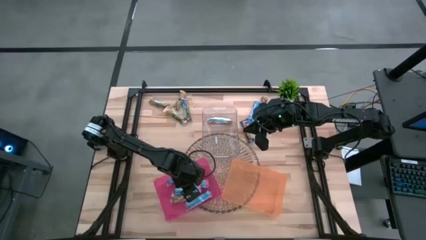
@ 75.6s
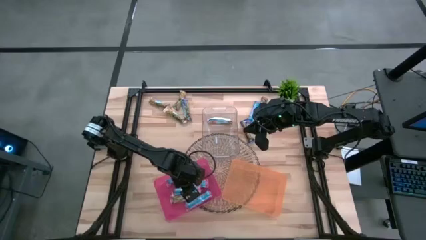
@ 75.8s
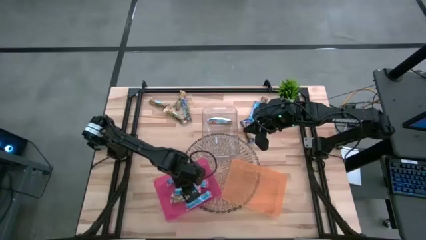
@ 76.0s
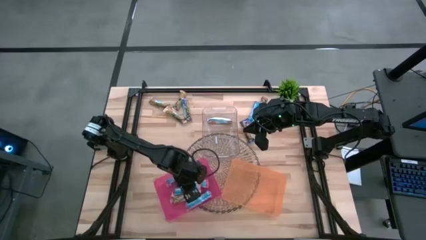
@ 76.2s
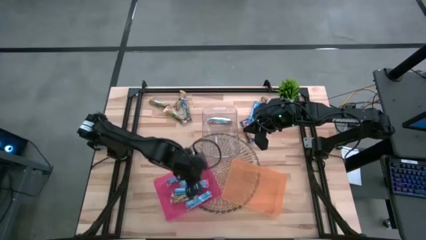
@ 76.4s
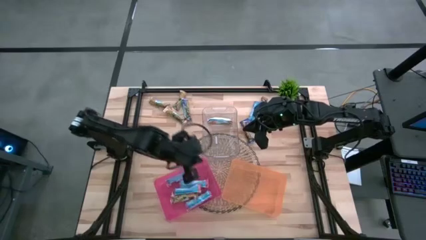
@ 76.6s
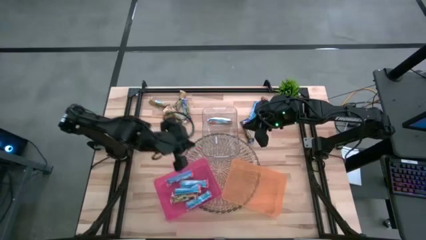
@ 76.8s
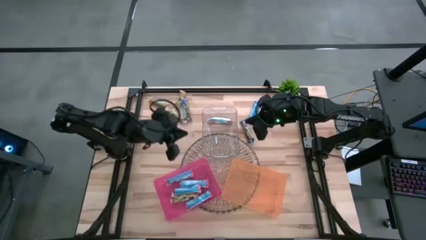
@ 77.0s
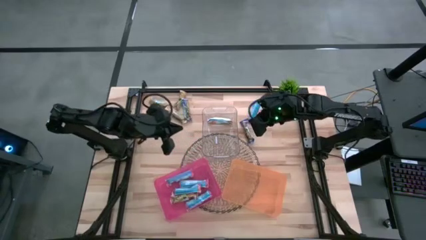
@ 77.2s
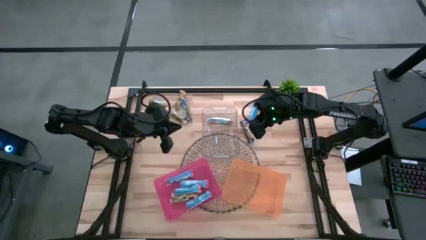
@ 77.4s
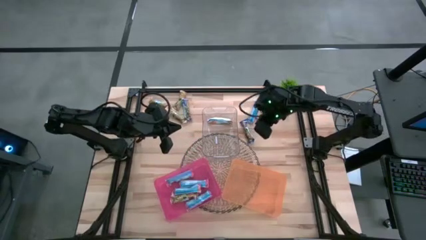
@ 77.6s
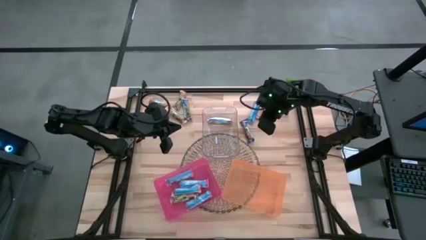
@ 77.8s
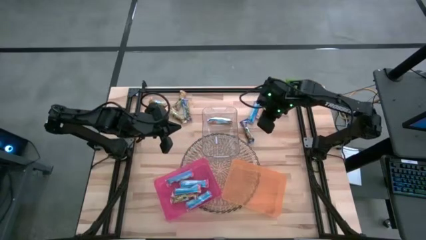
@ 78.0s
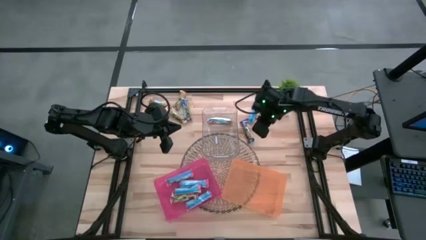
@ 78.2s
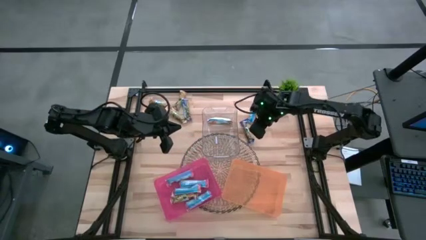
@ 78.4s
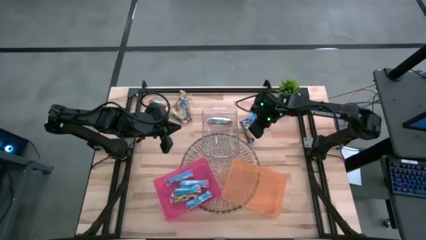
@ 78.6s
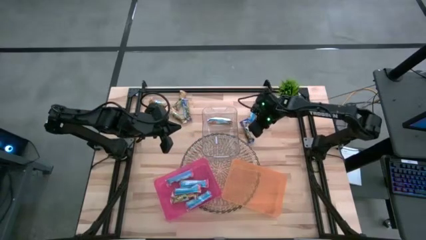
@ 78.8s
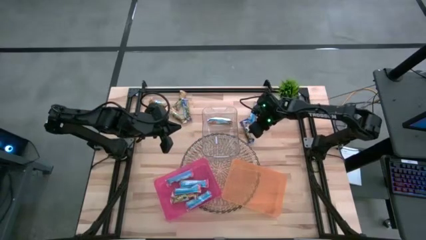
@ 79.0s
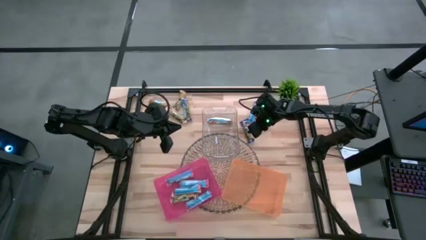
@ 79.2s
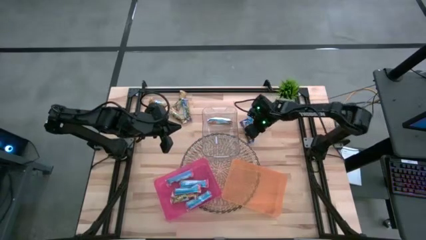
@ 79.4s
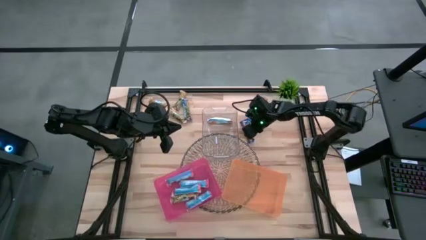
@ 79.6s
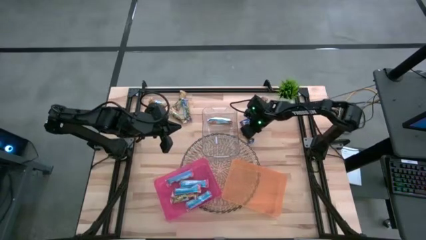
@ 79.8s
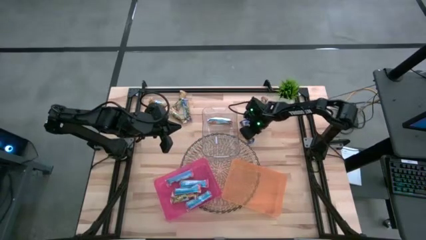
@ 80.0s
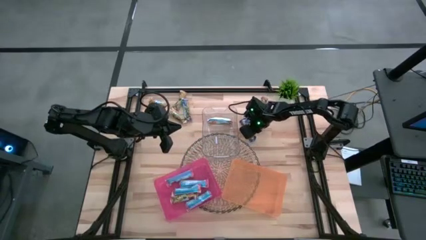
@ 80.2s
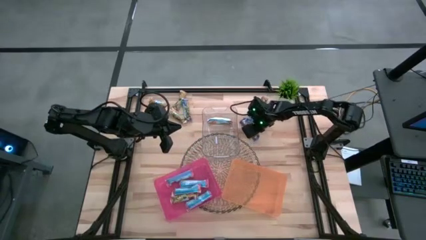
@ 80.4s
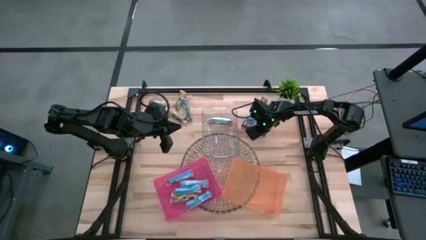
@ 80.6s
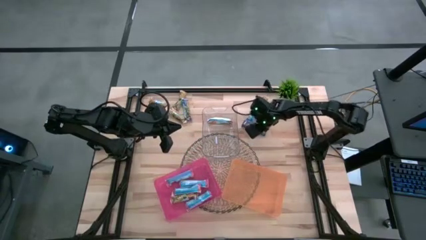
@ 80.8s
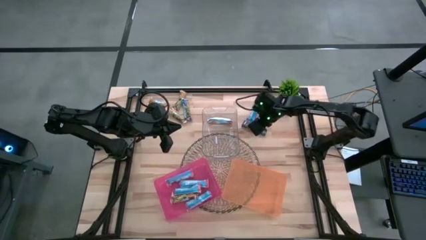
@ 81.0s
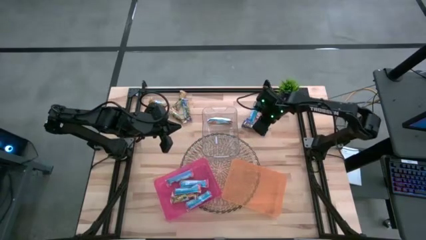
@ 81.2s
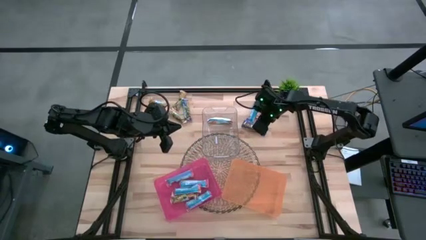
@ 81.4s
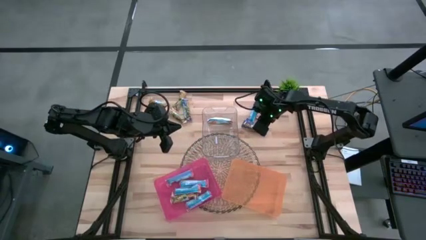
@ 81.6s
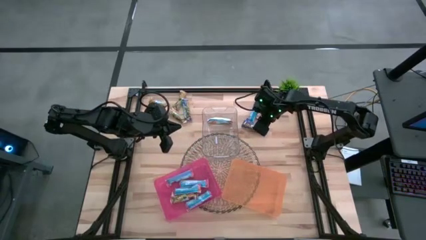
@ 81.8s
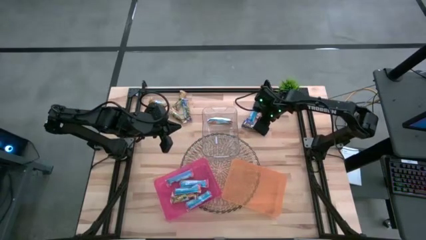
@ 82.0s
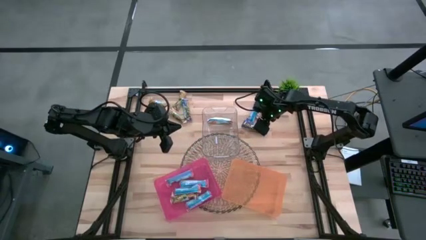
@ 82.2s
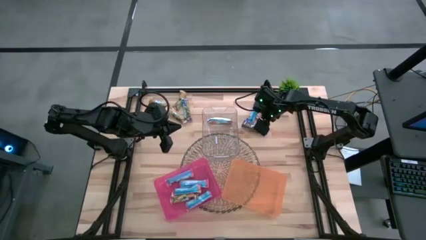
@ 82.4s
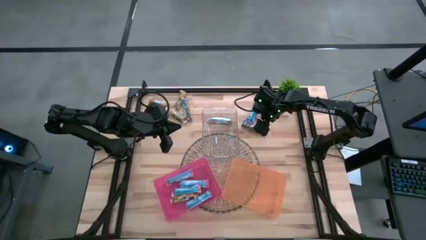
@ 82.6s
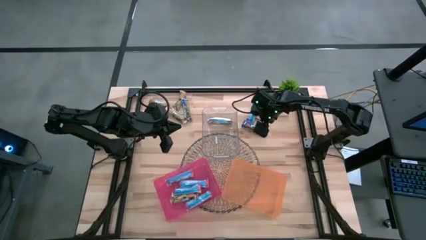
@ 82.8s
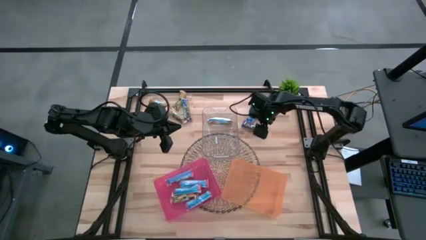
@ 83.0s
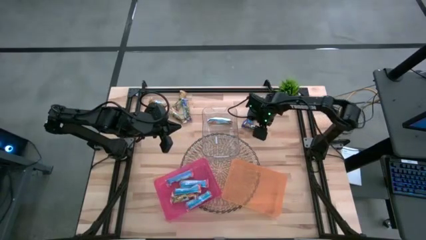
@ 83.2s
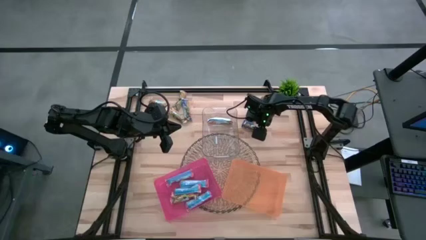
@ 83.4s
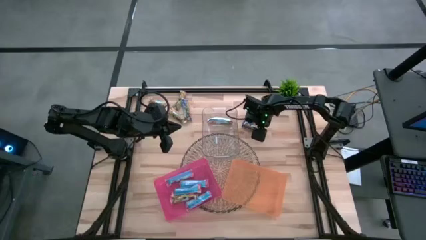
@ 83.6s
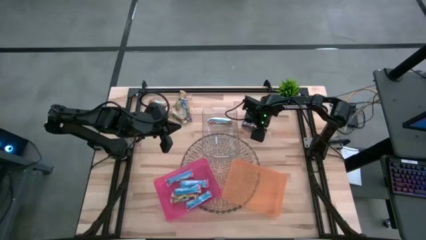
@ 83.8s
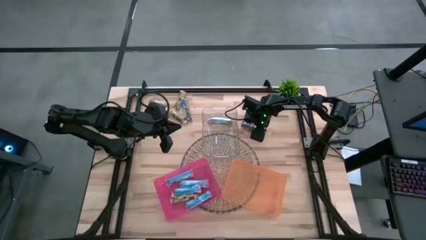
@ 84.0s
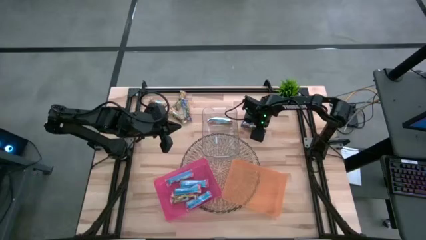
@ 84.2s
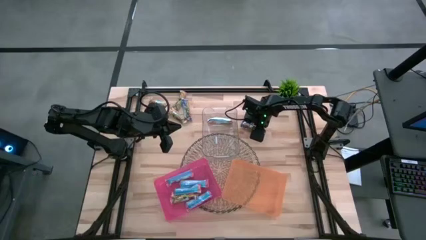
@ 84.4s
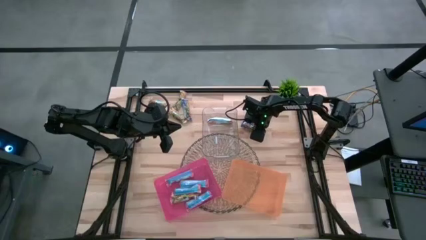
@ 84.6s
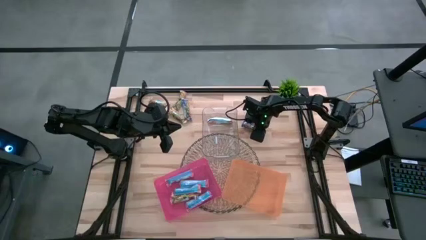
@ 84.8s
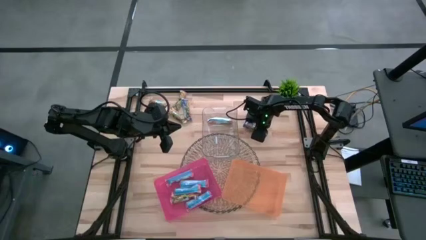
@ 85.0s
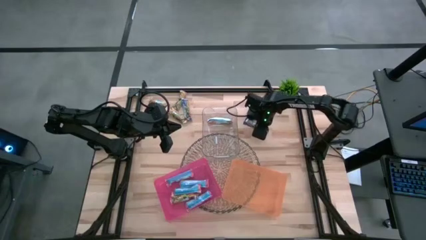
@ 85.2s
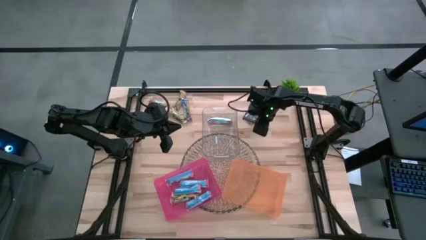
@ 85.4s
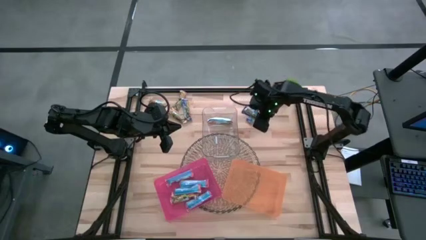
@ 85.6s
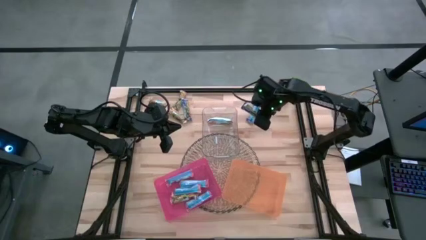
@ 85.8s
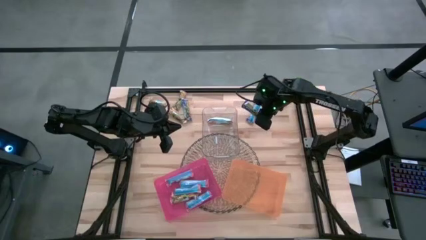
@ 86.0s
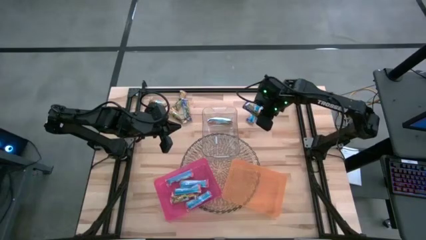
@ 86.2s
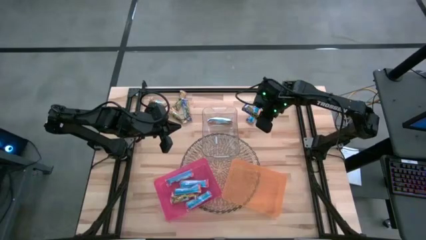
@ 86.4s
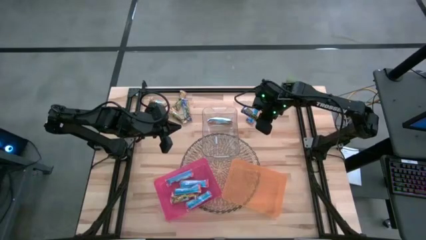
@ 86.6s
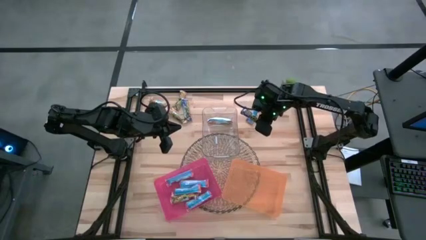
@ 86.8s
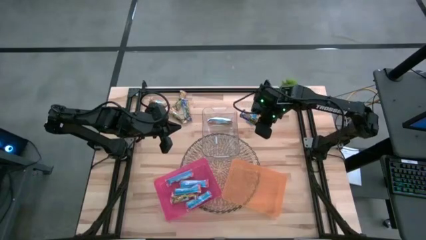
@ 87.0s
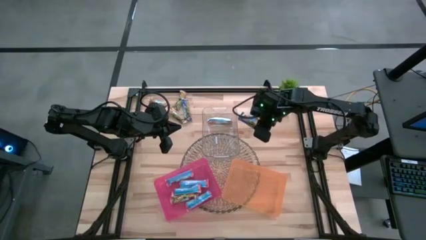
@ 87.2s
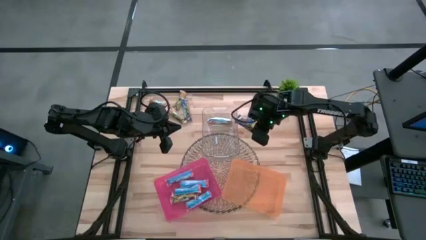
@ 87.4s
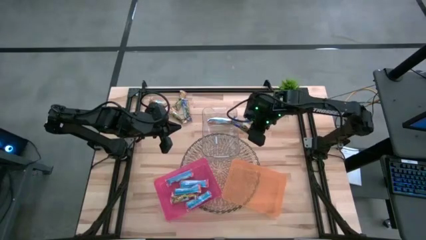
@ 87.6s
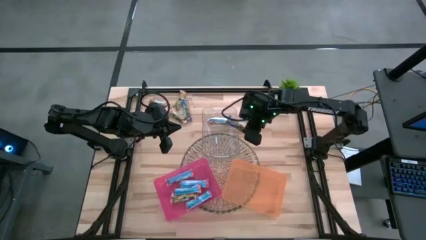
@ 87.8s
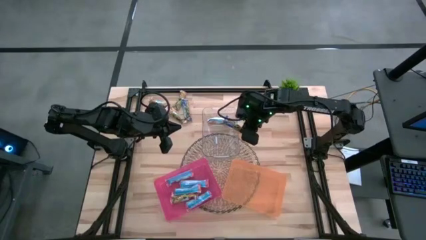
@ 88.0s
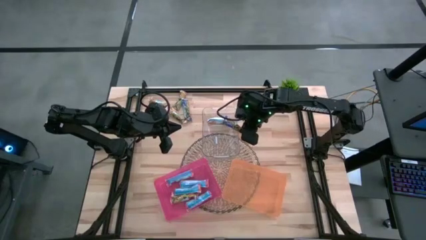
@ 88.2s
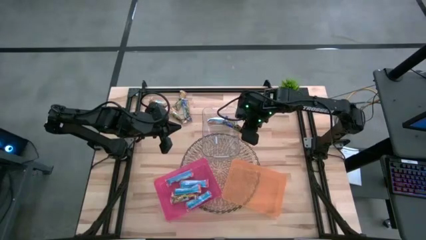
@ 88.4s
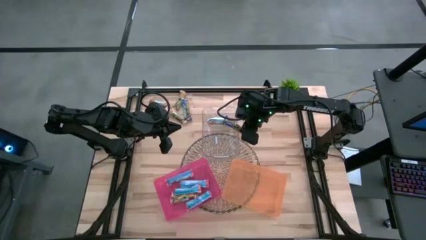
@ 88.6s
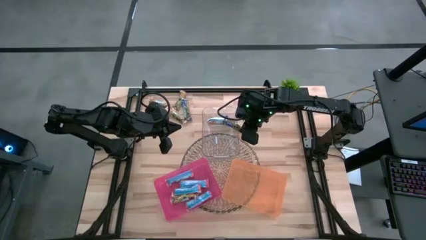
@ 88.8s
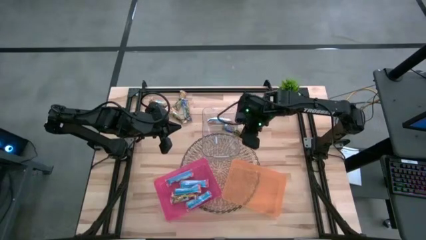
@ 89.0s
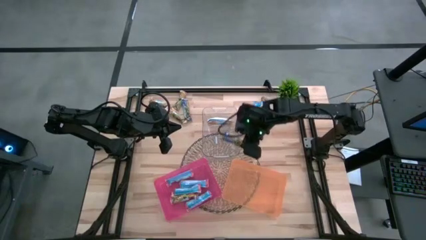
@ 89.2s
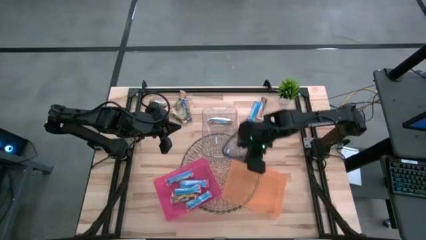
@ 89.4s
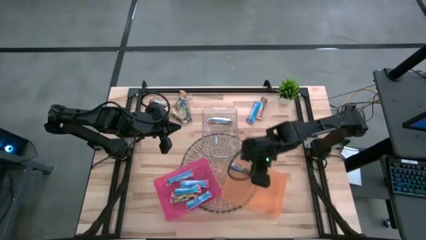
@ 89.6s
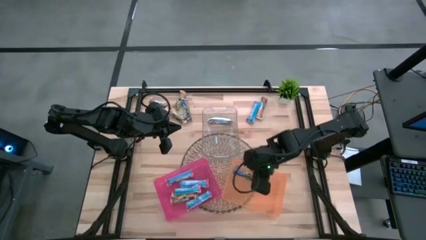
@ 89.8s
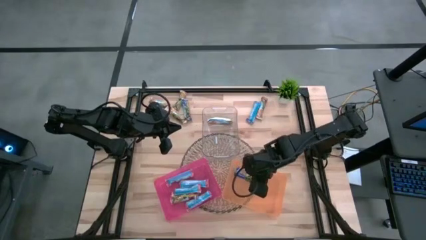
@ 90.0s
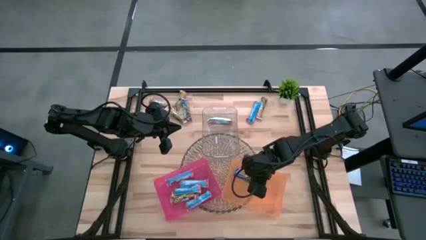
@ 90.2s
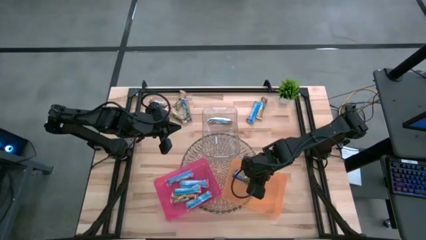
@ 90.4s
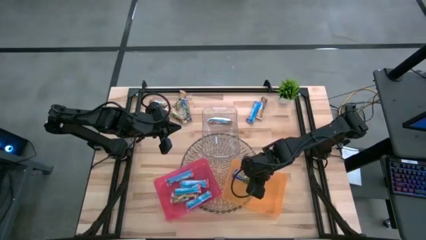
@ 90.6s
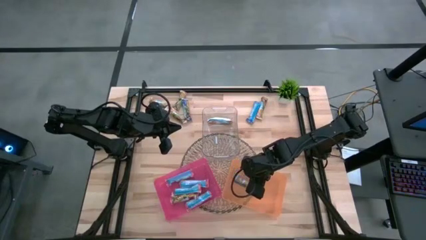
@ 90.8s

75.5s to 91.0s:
Task: Pick and place Granola Bars by type
Put the blue granola bar into the orange bin
